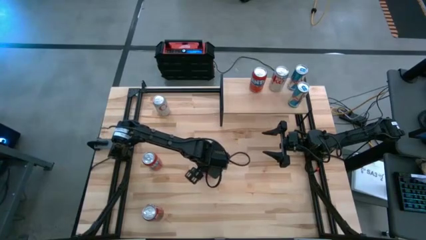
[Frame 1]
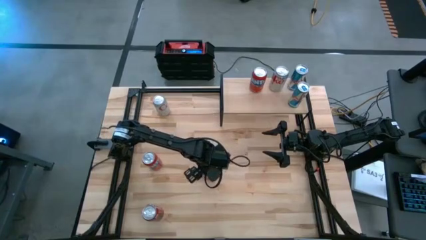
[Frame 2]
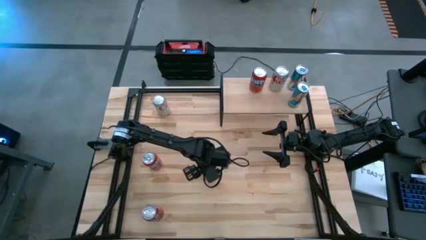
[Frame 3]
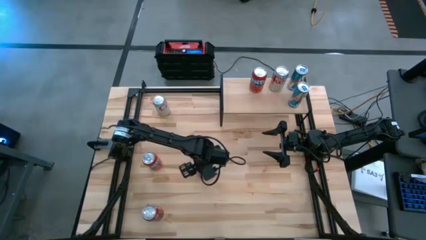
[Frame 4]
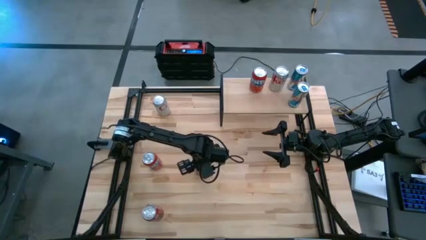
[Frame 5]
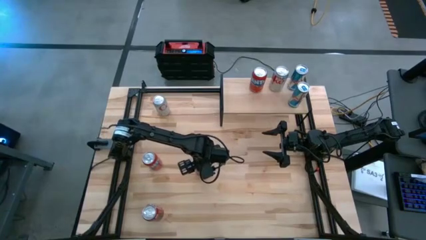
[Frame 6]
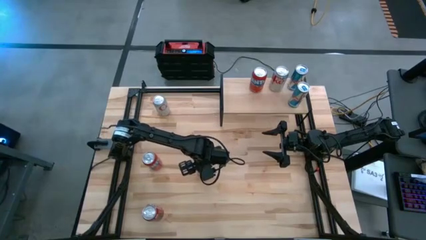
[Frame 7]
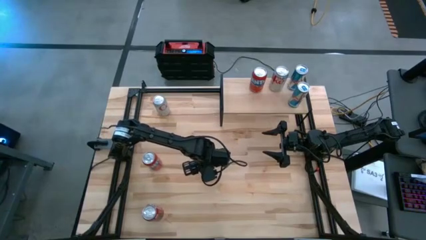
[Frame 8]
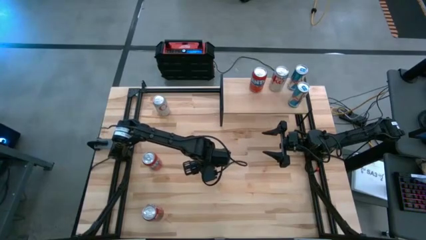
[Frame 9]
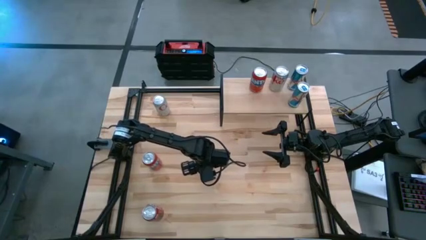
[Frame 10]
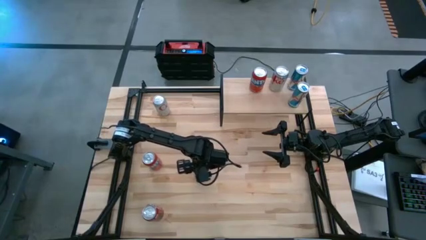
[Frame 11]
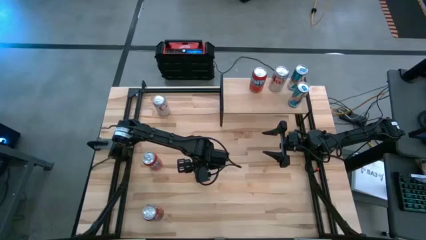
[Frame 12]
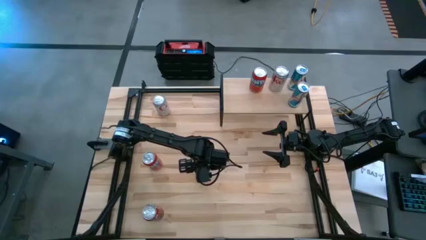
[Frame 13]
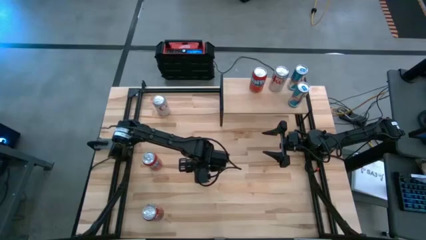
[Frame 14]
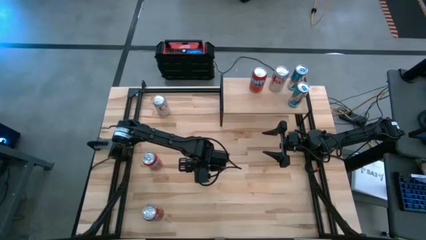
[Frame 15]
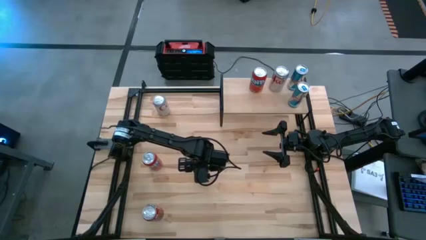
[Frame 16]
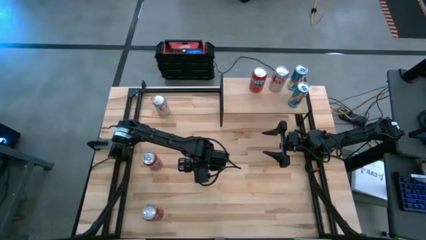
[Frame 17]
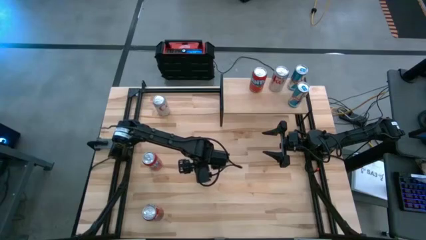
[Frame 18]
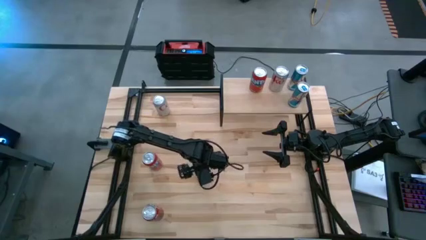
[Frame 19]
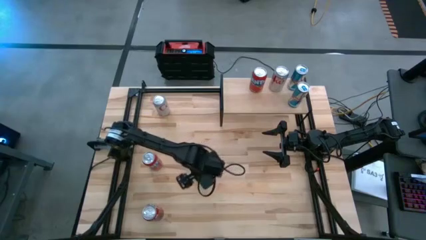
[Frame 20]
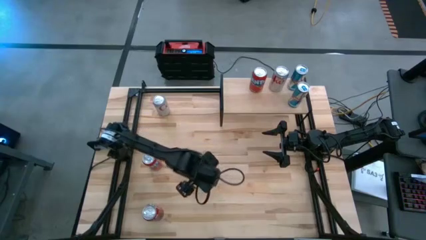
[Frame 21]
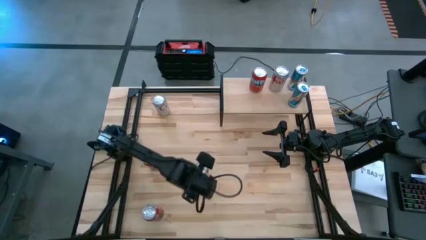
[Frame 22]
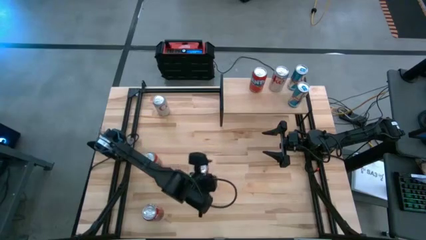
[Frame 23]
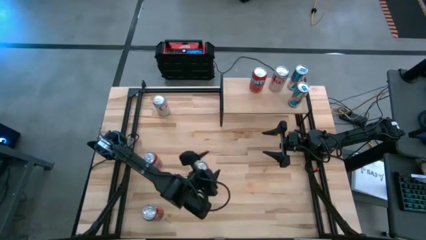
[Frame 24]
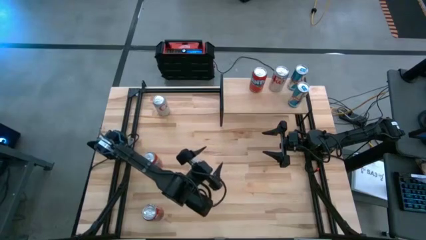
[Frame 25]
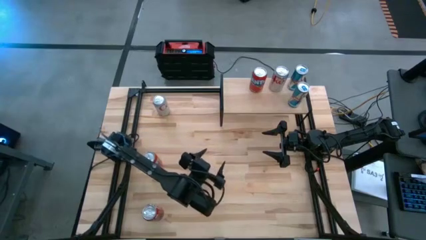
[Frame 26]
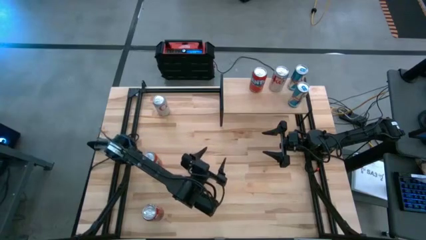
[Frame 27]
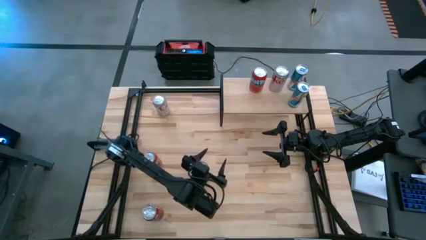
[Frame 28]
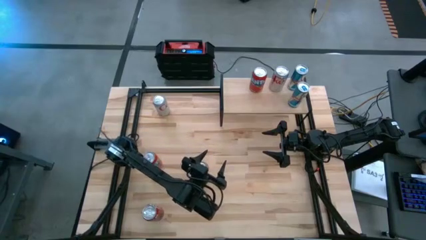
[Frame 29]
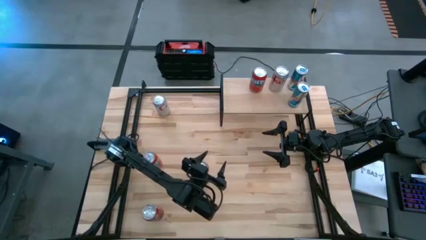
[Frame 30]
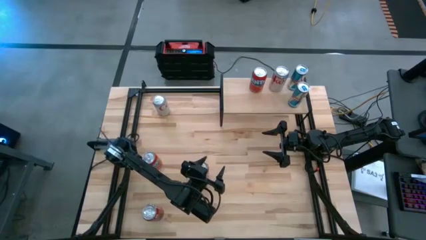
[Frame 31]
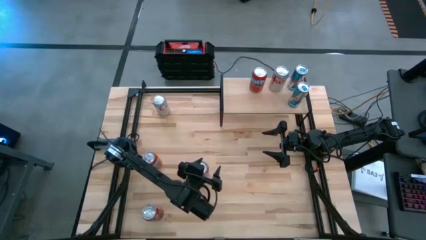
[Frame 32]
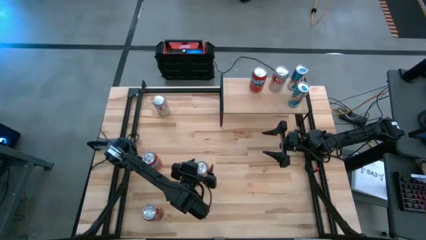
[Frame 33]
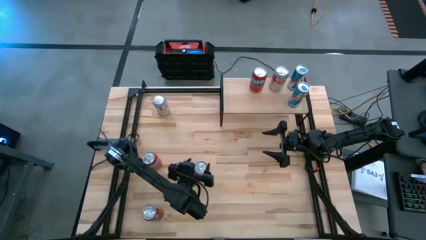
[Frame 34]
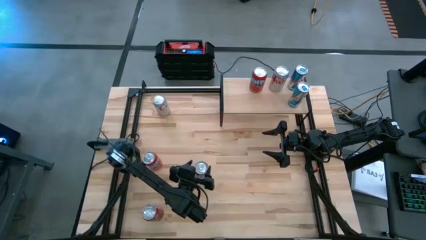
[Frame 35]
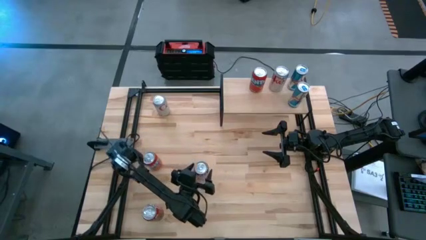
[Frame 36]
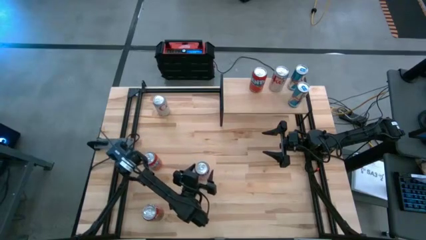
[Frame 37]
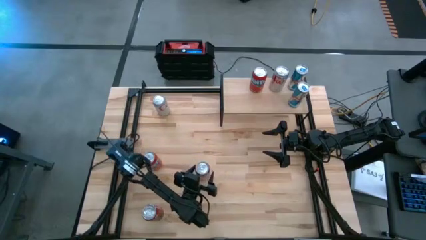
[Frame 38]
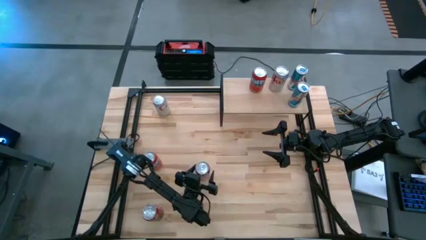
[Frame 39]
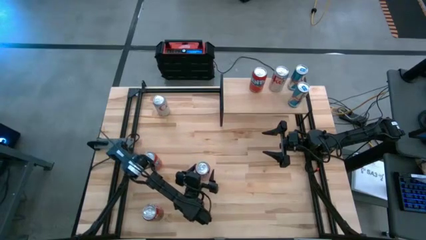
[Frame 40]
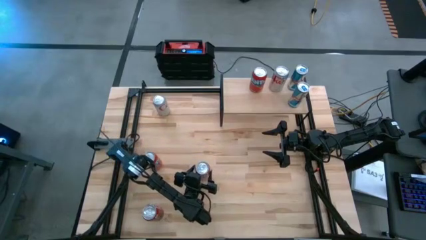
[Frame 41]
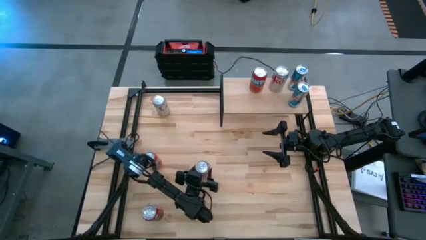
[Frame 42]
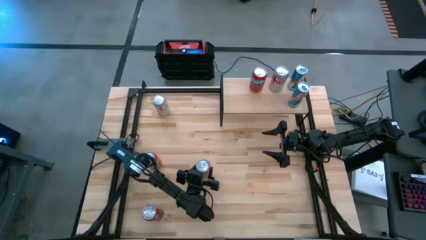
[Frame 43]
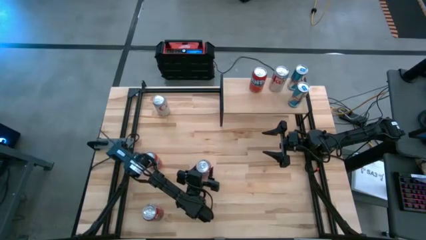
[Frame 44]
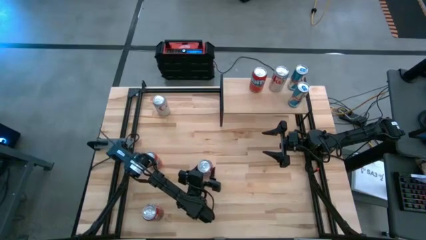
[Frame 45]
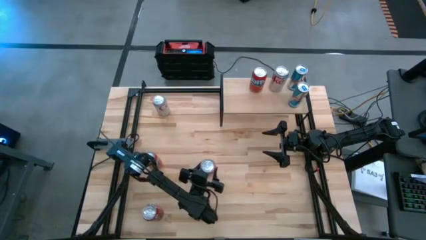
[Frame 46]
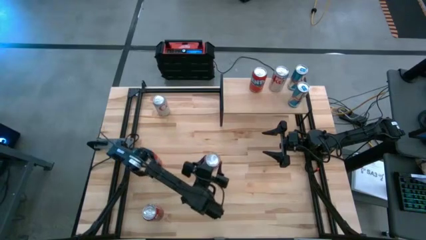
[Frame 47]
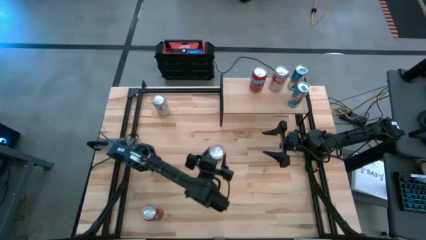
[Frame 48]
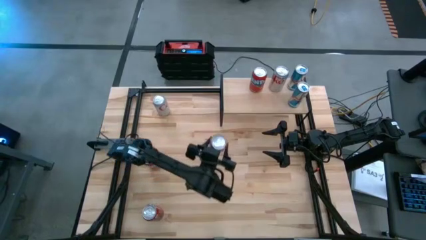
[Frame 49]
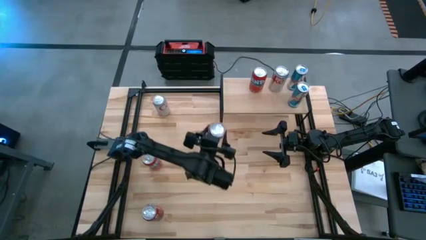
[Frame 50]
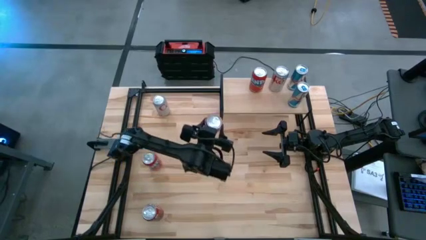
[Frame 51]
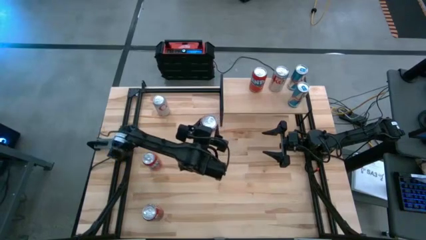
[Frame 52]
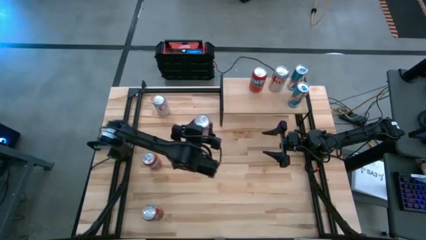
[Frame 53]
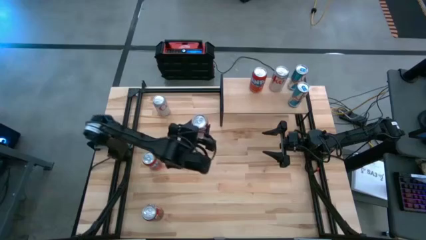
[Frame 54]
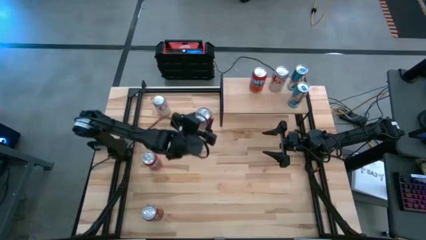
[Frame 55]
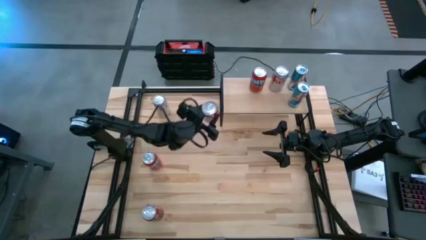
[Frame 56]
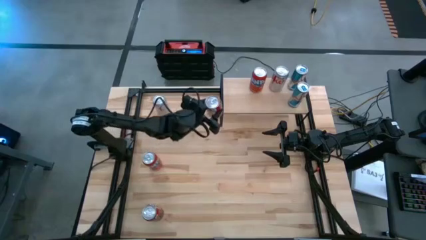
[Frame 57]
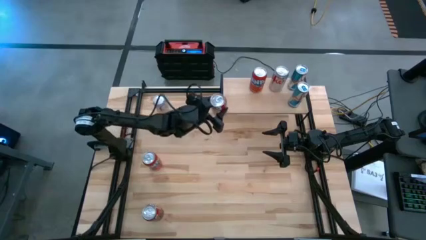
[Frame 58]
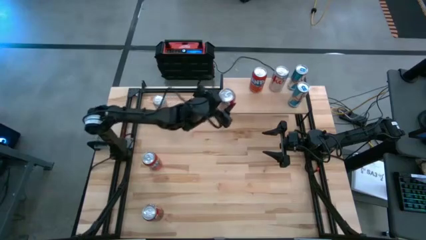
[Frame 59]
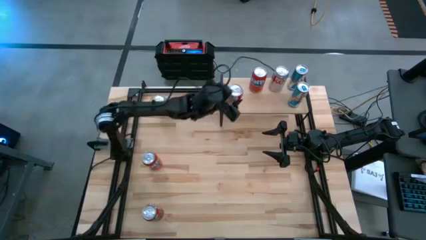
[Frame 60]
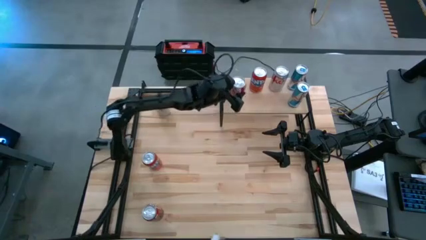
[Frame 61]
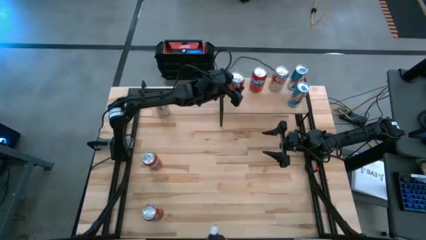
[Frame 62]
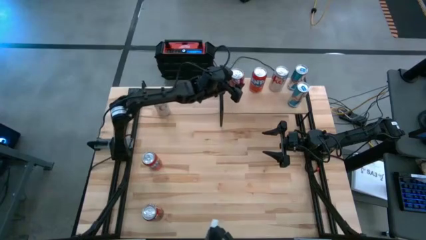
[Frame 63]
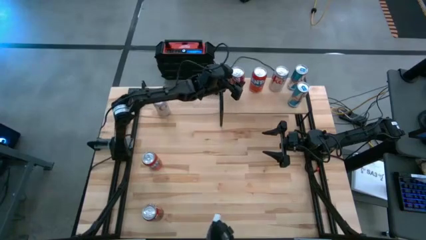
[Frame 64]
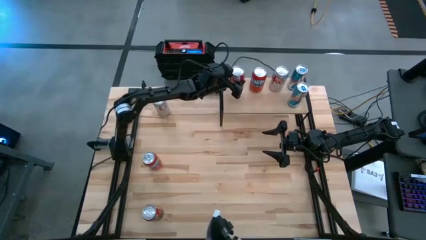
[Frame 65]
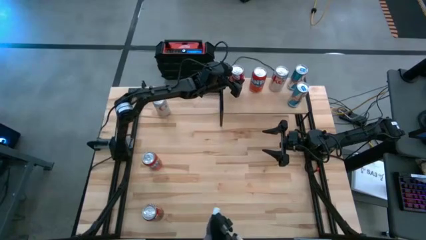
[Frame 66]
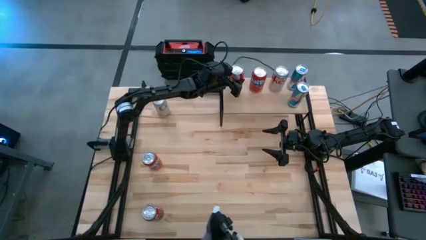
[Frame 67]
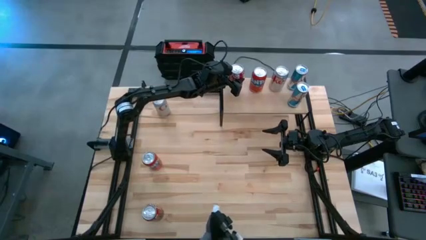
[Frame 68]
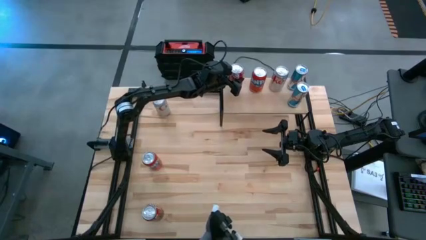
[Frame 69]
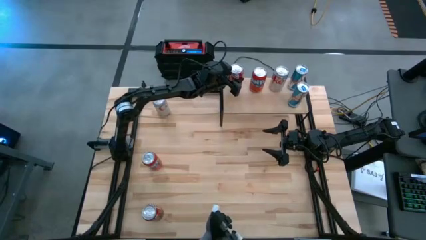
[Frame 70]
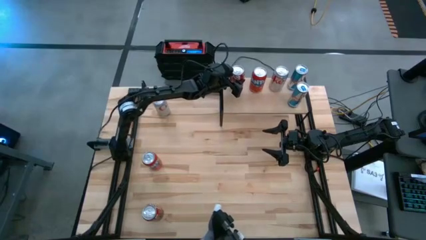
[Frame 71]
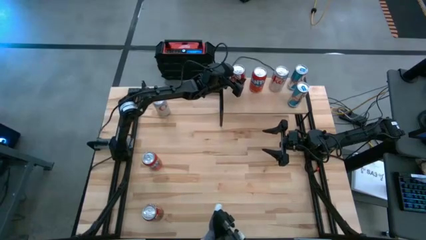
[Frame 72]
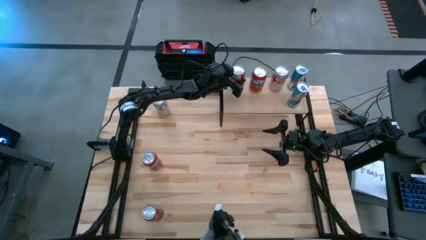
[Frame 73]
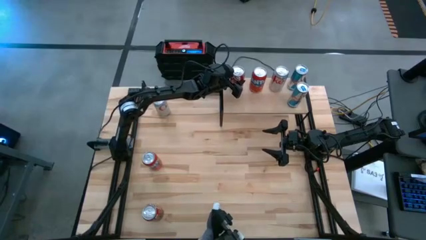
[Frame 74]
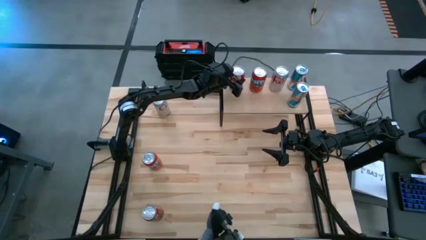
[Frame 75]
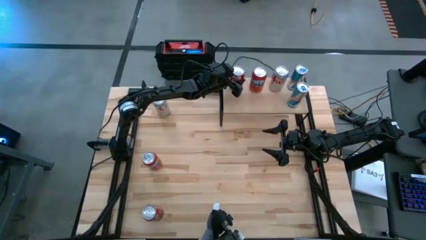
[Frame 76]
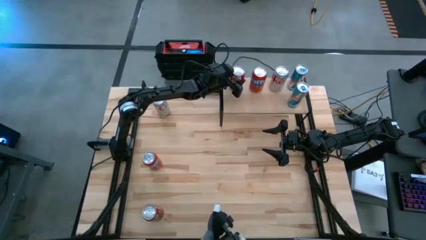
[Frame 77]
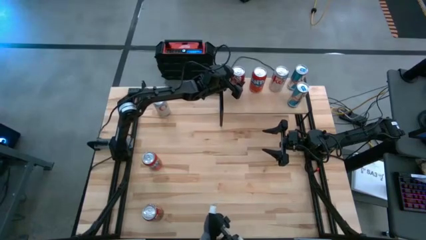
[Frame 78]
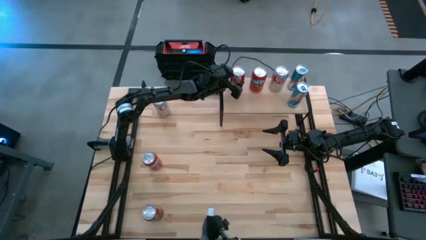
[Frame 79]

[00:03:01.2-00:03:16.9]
Task: Place canned beverage on shelf
Put the top red white soda can on the shelf

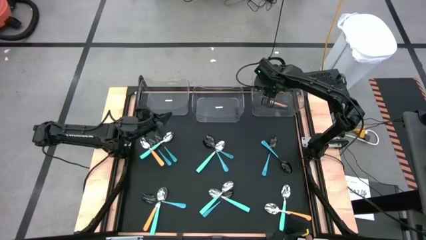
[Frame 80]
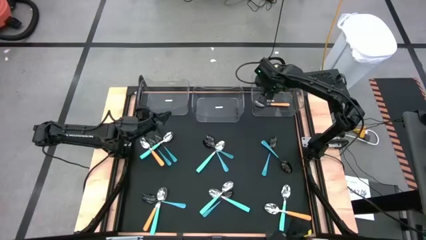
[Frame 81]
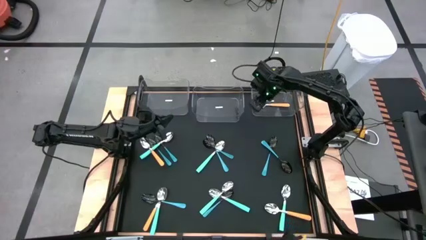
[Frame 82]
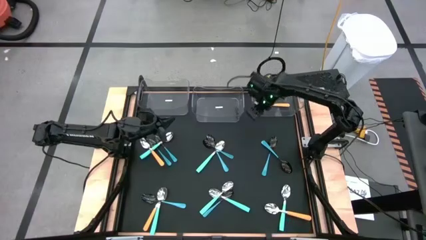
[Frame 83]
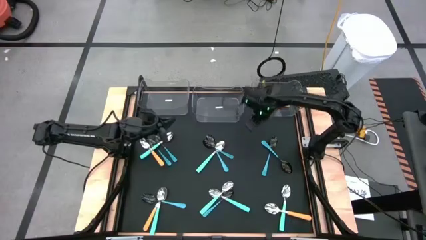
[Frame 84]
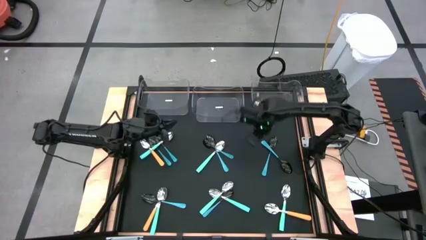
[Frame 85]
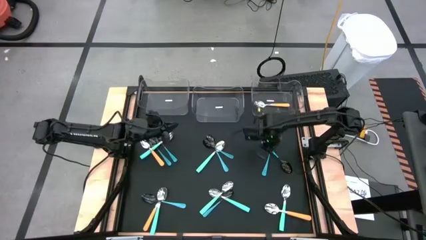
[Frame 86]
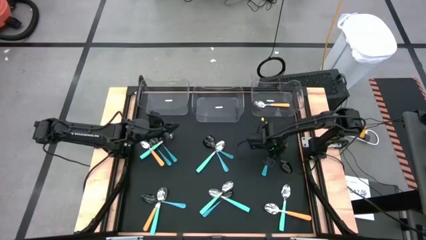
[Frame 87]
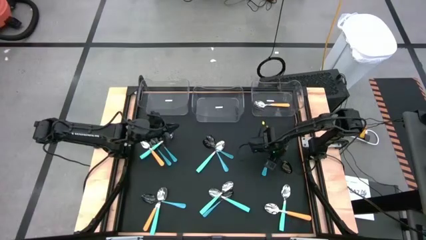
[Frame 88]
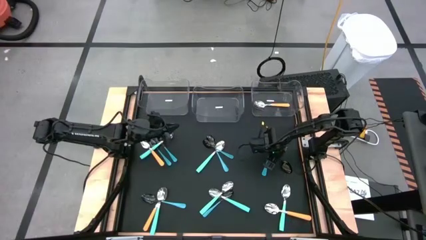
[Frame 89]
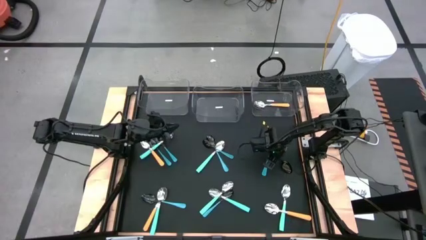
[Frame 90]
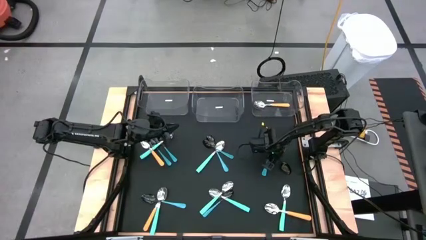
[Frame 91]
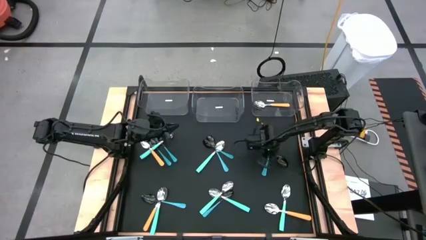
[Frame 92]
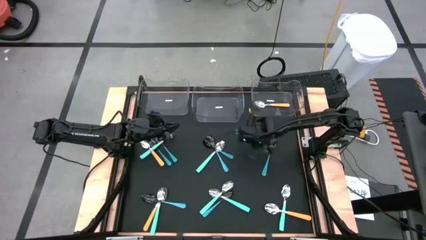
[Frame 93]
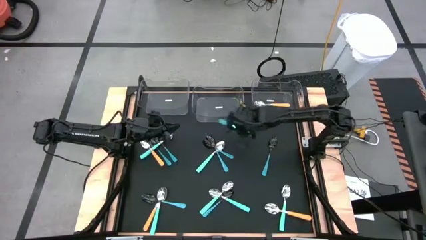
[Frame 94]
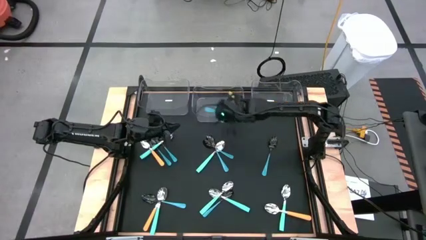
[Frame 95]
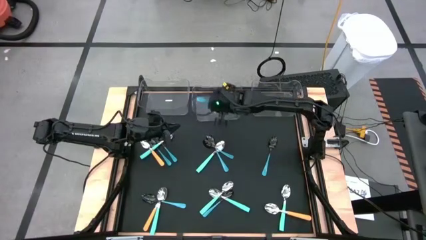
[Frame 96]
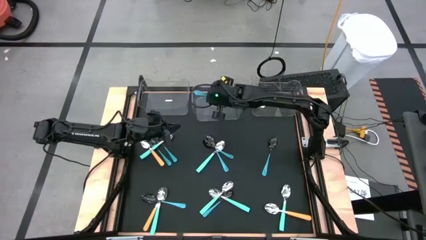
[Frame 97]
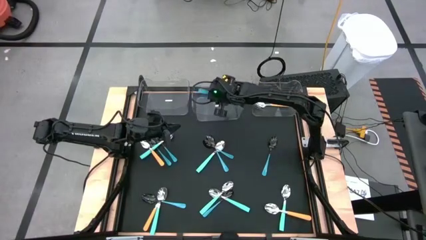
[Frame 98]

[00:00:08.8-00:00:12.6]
Task: Sort silverware by color (type)
Put the blue spoon into the middle transparent bin
